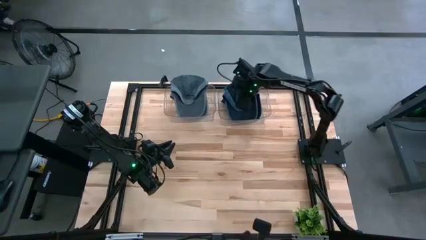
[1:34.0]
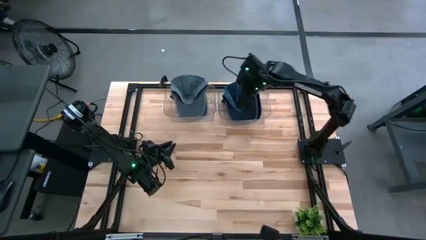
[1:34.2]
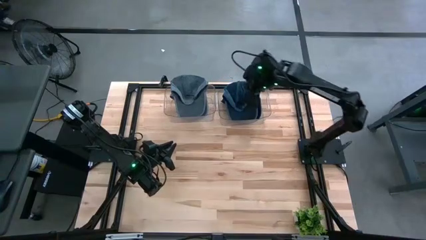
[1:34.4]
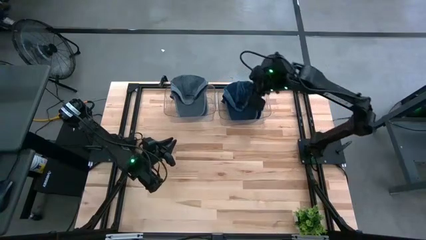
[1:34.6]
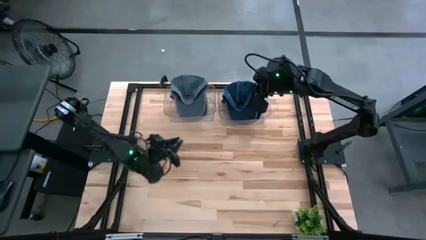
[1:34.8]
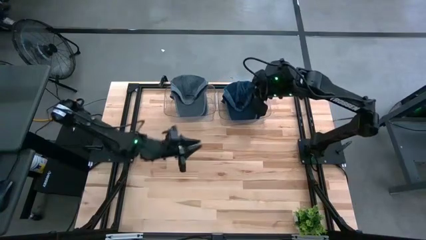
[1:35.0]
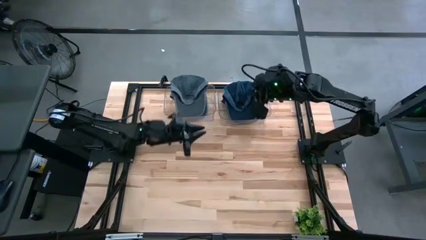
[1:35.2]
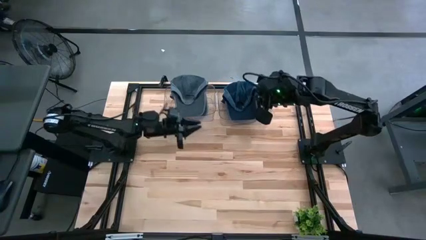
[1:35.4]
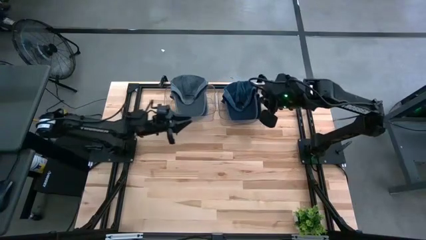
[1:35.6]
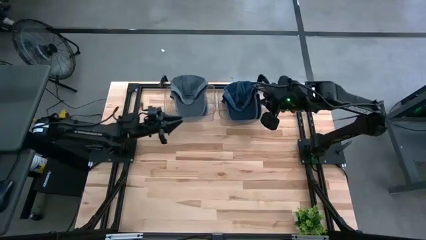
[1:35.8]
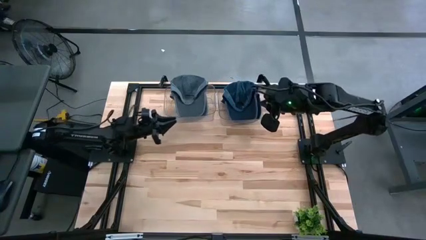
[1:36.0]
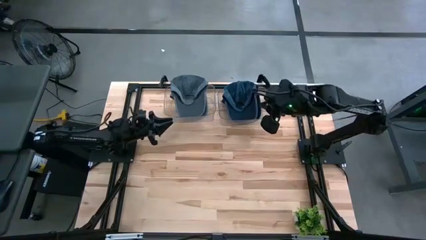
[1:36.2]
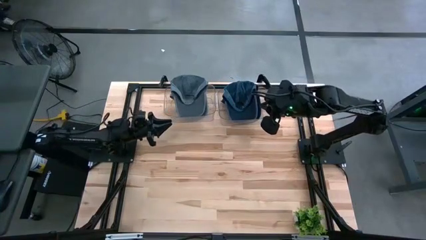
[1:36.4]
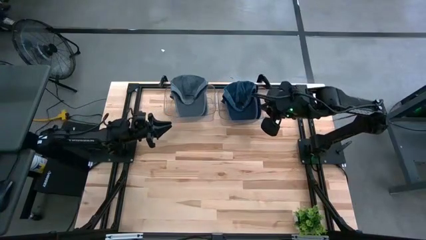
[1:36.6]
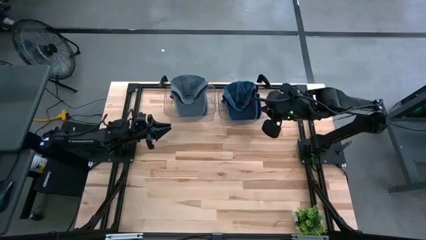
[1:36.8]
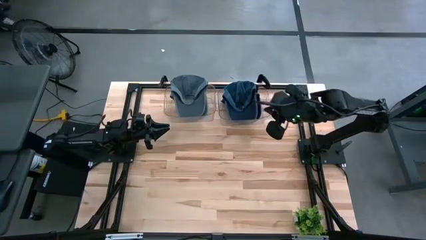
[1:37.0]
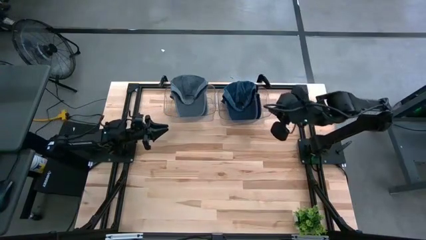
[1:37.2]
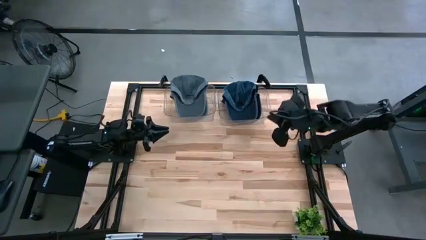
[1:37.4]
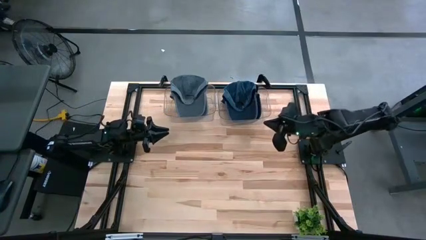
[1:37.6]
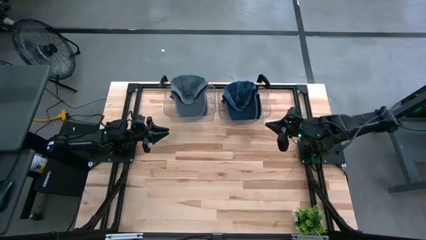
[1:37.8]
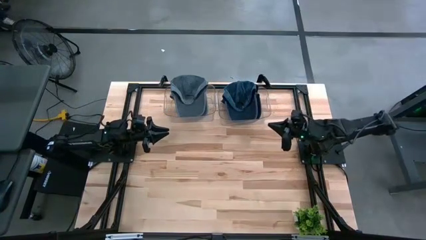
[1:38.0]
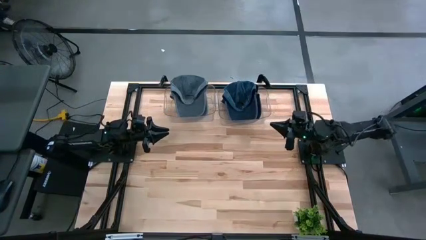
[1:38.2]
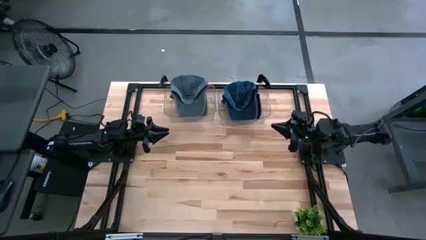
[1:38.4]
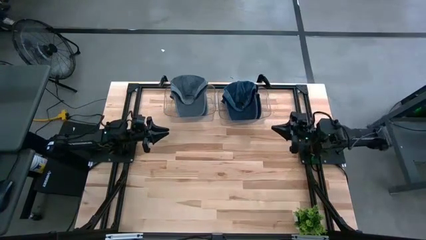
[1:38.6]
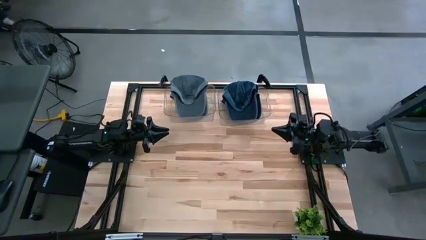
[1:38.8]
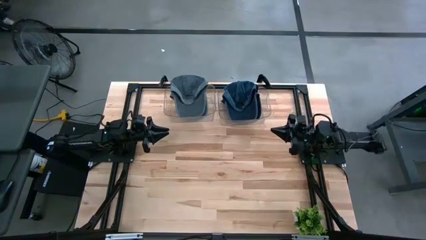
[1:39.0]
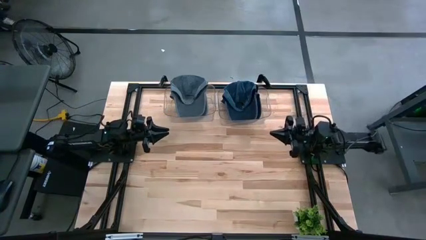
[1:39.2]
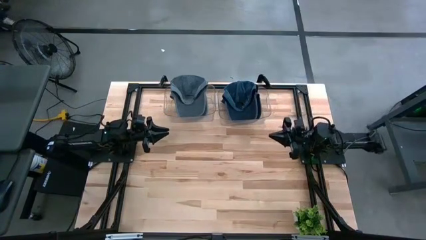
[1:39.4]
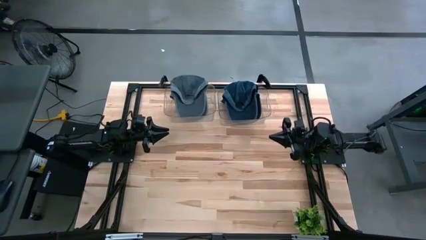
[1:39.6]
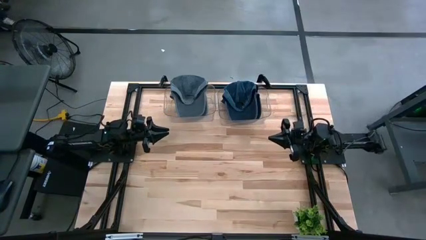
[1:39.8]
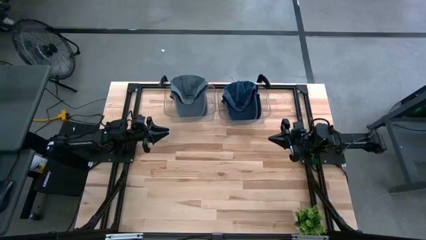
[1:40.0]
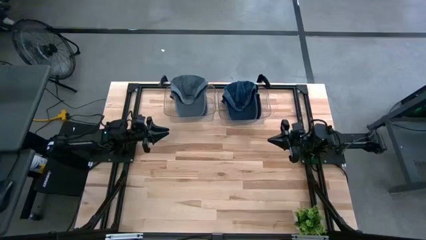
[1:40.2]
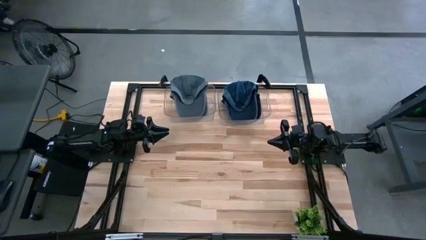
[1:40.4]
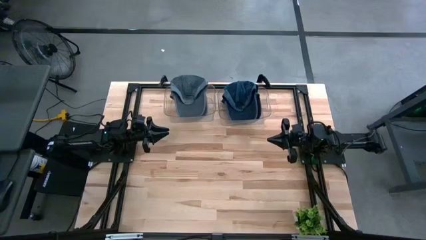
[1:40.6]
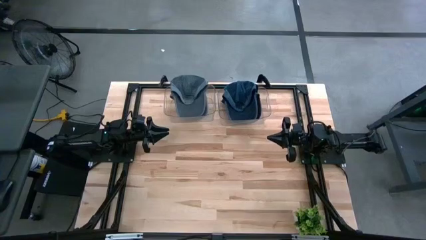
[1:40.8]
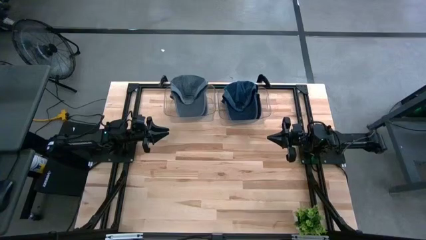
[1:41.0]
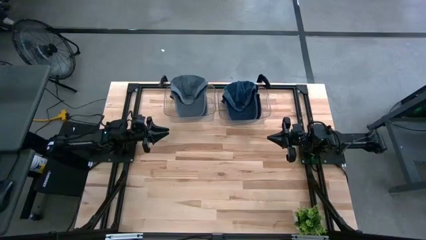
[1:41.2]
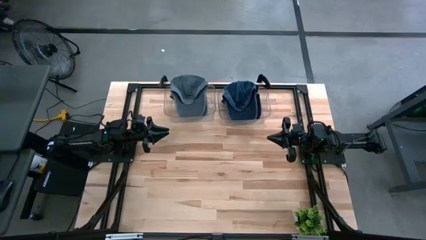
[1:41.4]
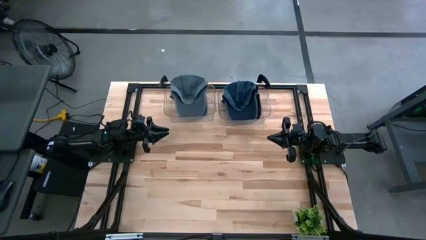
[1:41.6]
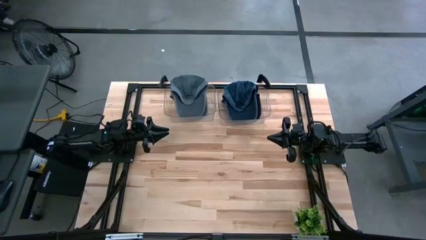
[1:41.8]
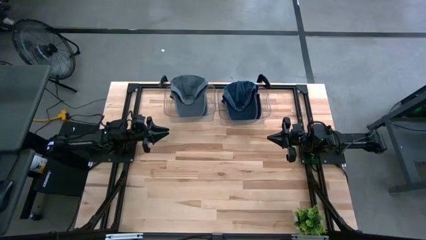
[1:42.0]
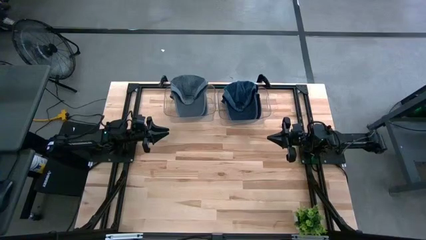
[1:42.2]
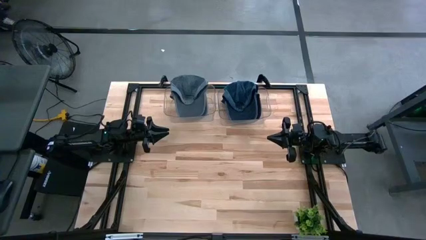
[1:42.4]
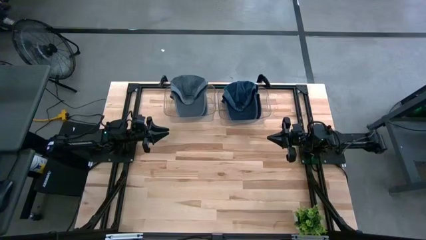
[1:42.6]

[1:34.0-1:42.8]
Task: Pick & Place hat
Return to Home Position

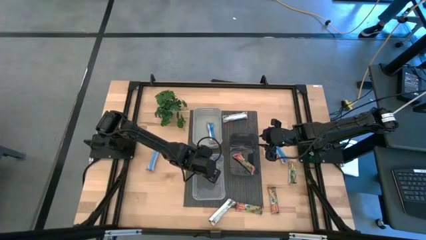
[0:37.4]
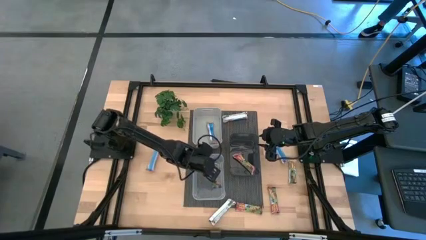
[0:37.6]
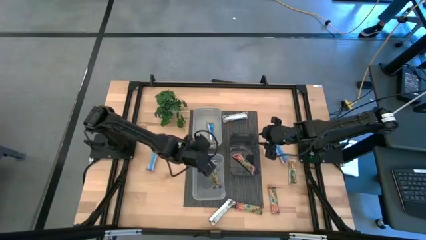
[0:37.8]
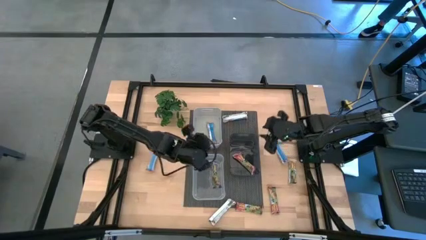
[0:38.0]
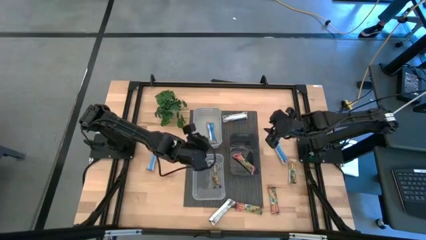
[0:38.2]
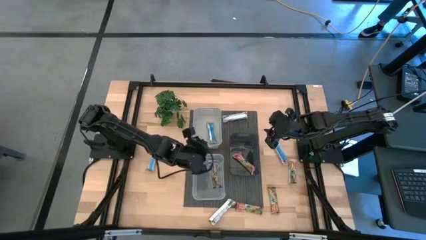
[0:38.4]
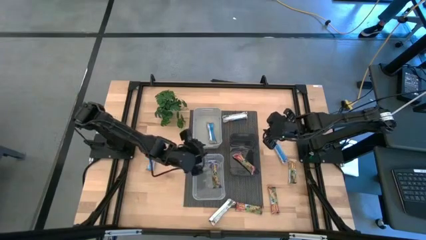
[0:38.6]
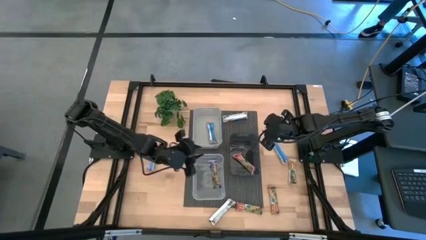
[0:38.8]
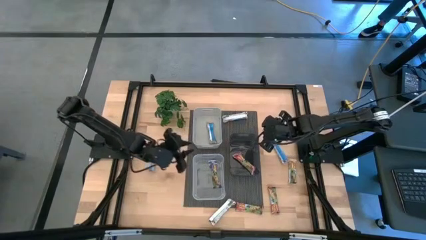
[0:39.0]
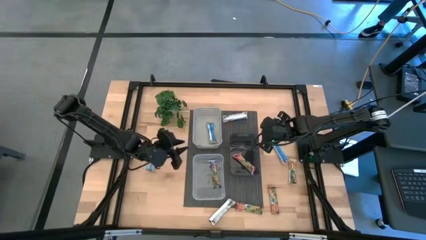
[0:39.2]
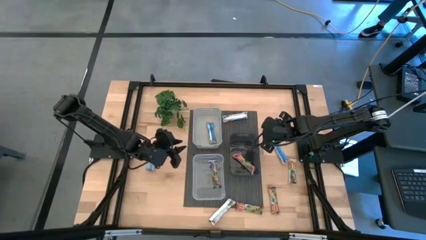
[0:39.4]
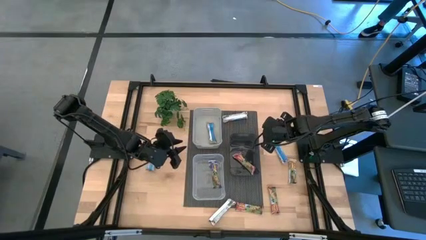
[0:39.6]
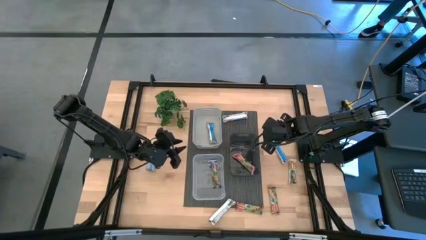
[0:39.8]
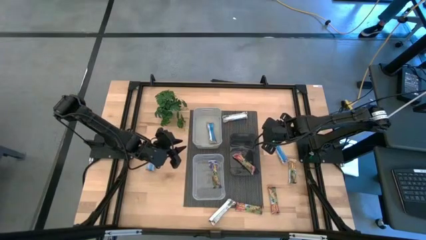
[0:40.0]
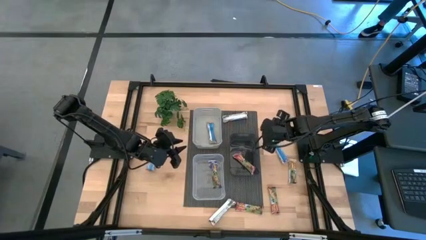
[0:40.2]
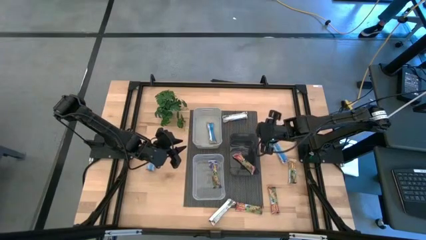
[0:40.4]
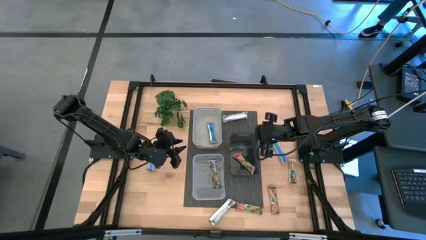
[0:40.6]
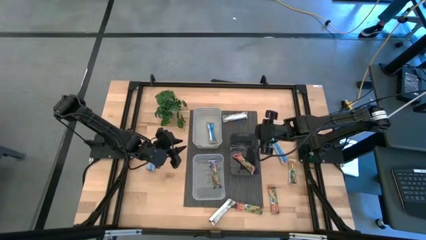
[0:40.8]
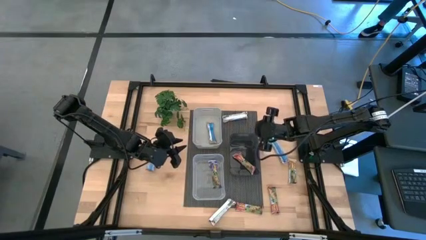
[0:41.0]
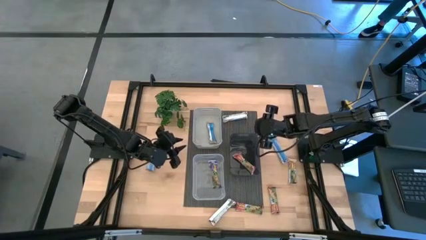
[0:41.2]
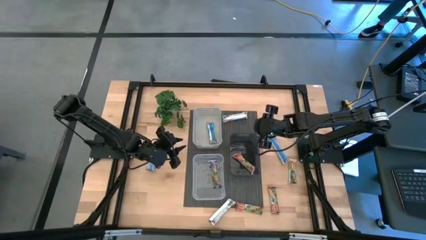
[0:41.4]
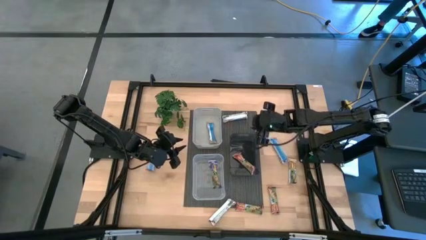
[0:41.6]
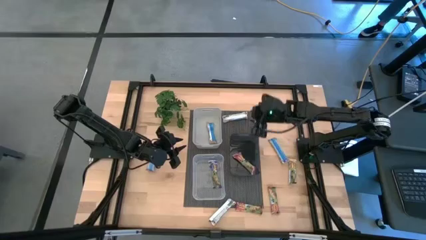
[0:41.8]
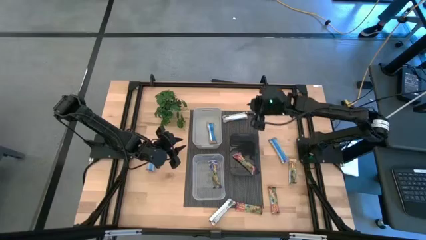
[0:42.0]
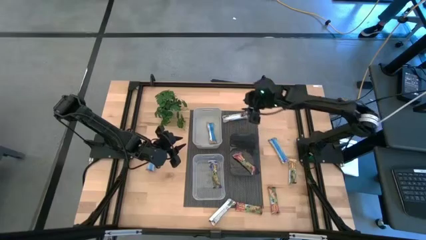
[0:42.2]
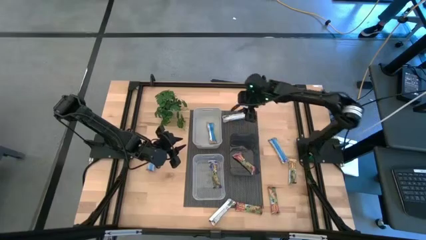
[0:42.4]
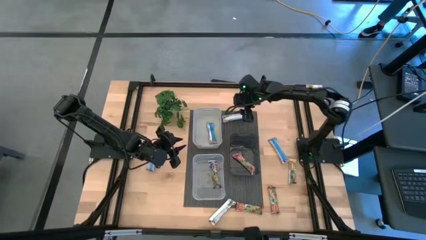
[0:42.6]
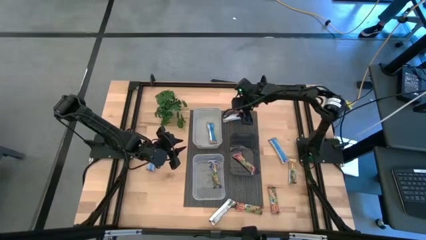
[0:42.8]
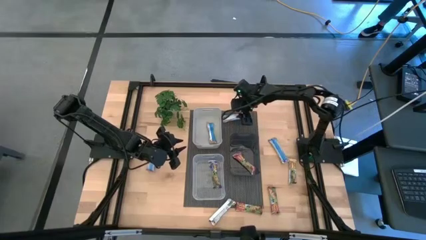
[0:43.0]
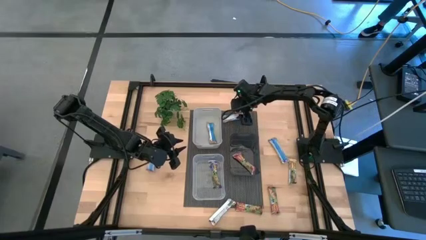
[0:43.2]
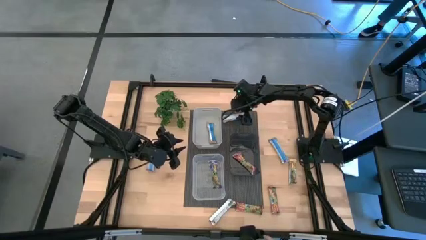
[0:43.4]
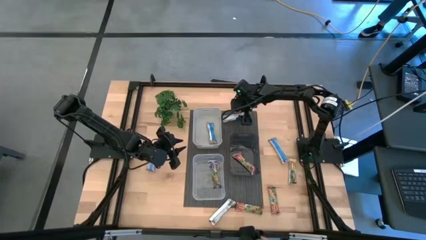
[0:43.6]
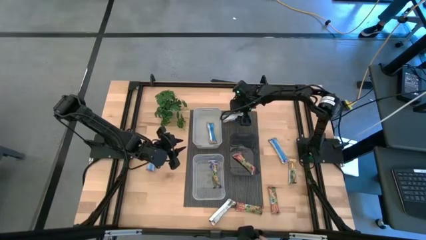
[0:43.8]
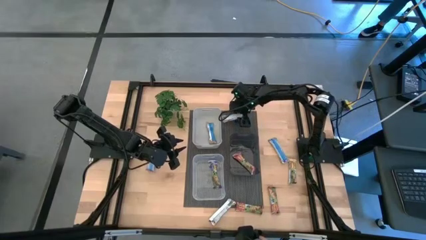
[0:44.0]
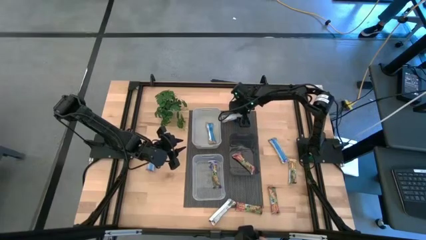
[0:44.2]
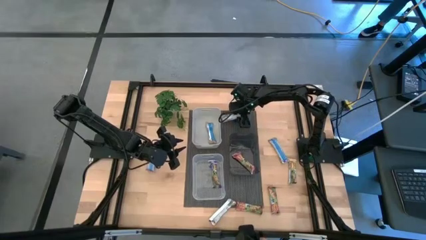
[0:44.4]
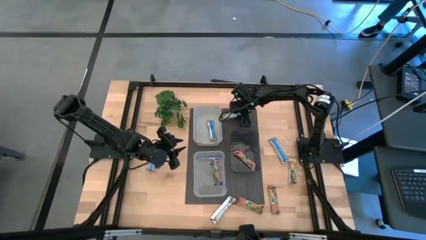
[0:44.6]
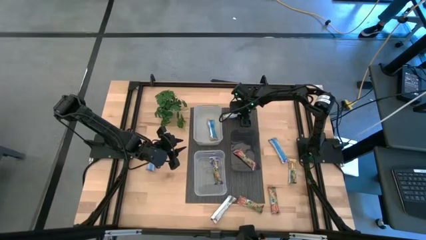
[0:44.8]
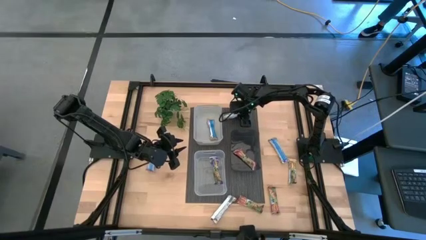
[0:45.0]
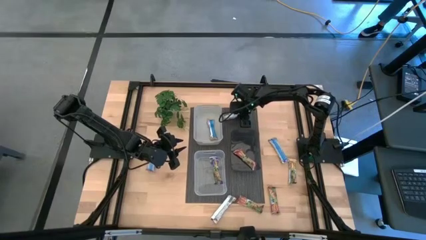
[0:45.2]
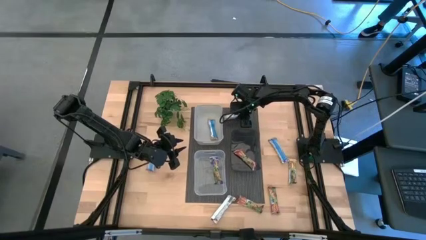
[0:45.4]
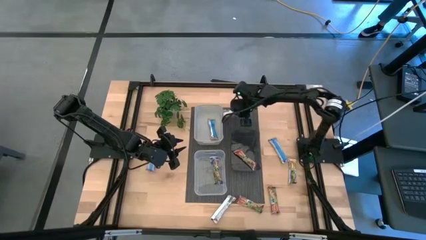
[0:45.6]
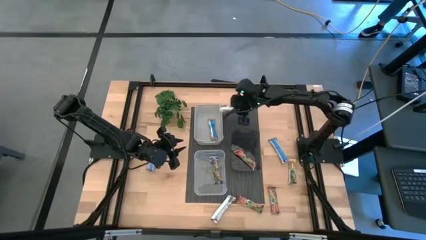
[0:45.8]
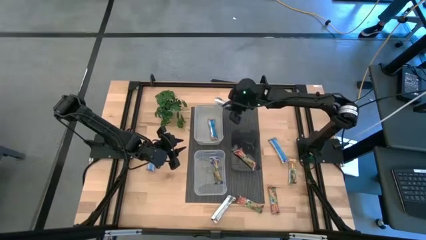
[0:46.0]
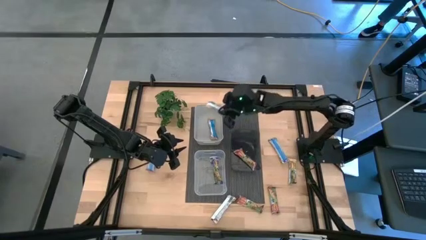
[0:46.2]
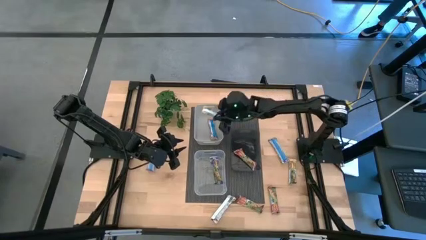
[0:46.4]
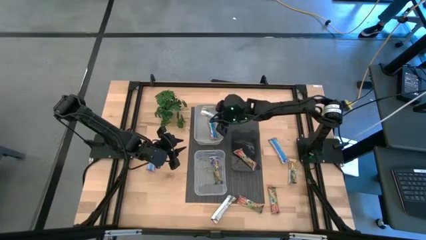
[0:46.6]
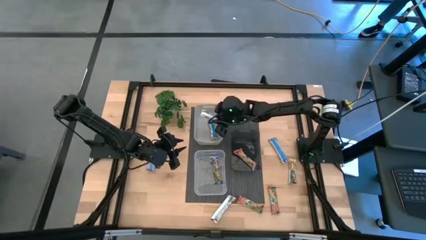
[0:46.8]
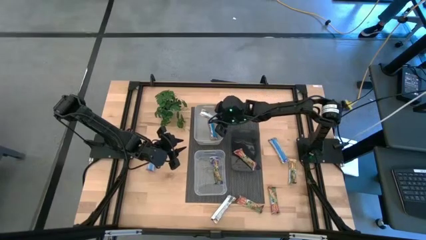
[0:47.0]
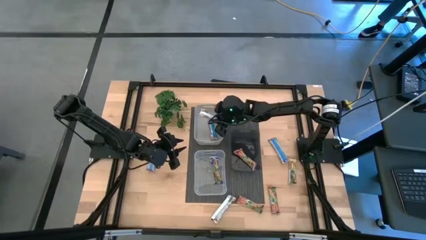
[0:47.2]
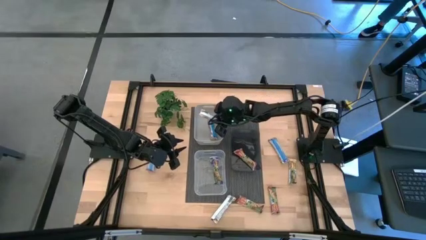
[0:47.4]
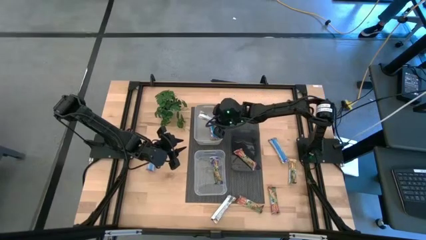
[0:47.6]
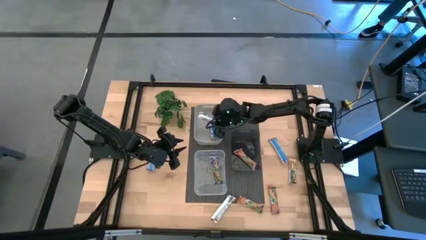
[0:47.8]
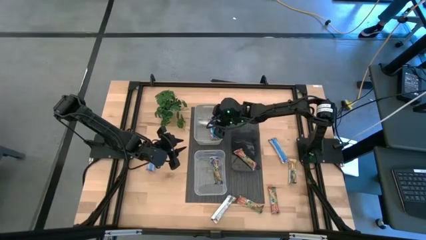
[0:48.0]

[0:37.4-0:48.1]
Task: Pick and place Granola Bars by type
Put the yellow granola bar into the gray bin
